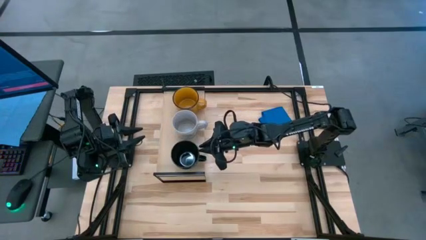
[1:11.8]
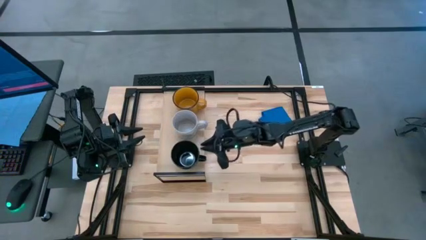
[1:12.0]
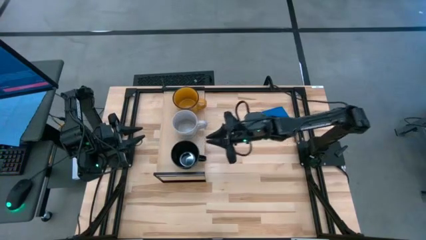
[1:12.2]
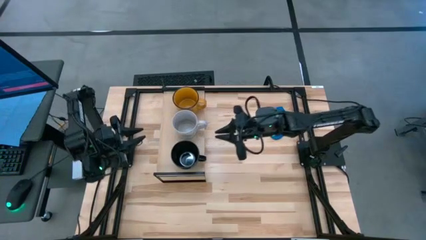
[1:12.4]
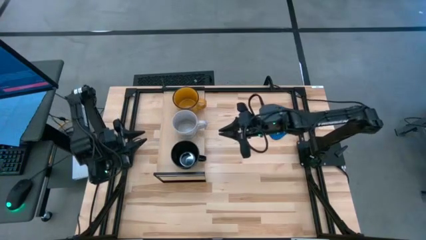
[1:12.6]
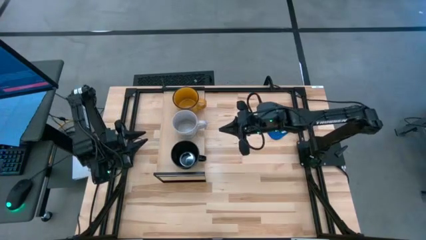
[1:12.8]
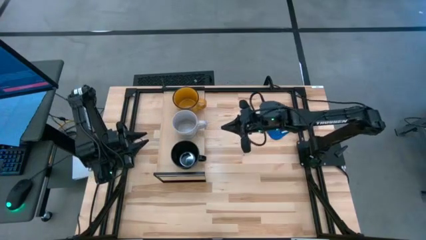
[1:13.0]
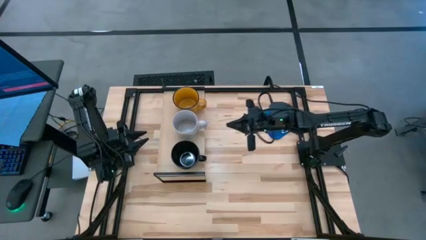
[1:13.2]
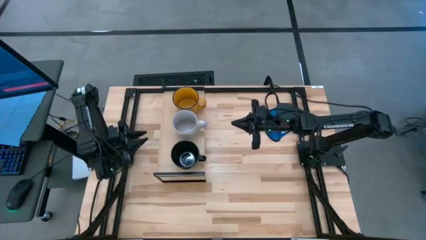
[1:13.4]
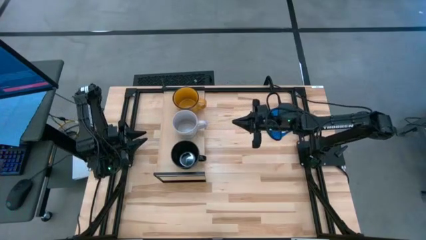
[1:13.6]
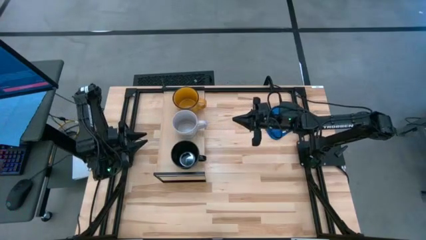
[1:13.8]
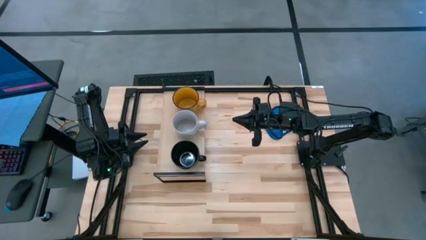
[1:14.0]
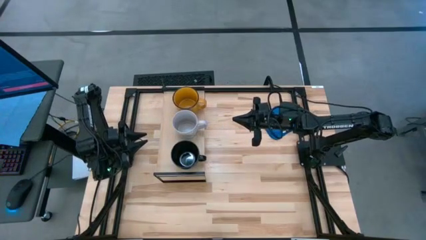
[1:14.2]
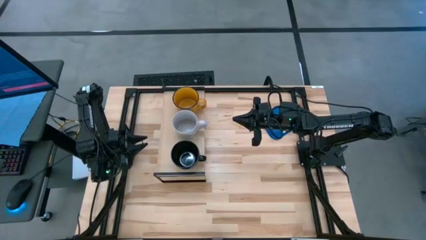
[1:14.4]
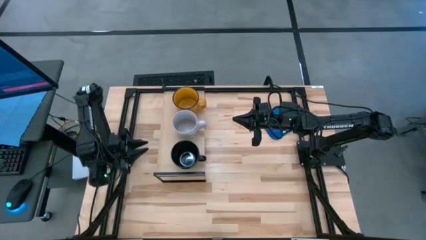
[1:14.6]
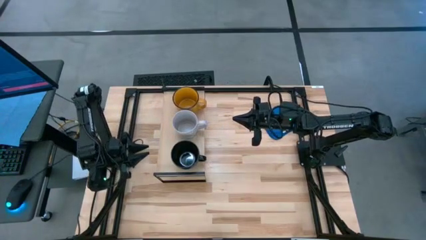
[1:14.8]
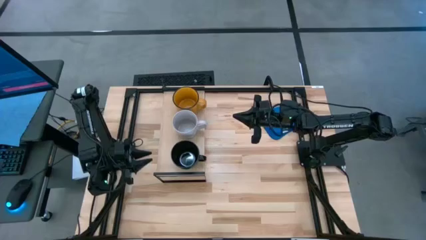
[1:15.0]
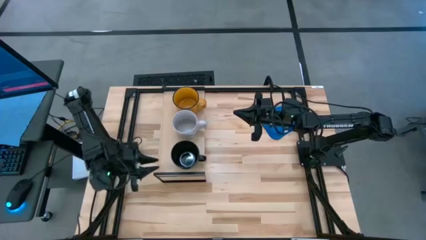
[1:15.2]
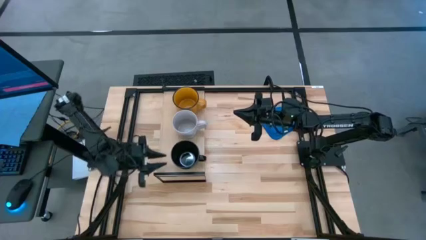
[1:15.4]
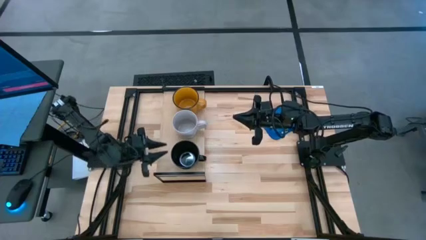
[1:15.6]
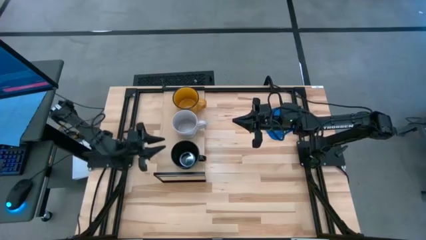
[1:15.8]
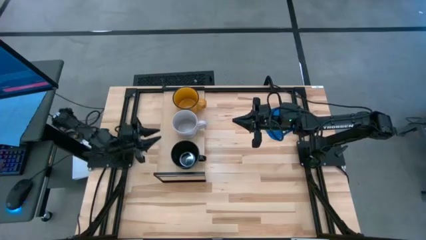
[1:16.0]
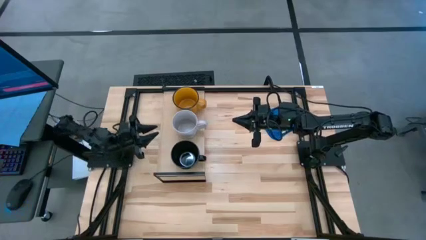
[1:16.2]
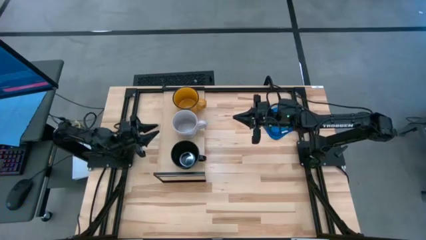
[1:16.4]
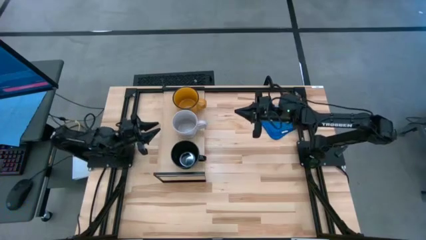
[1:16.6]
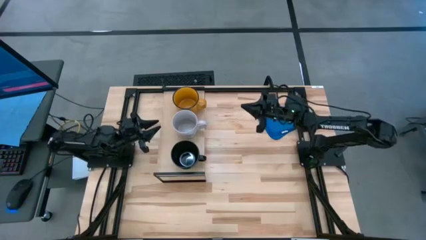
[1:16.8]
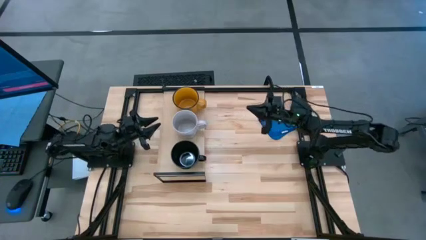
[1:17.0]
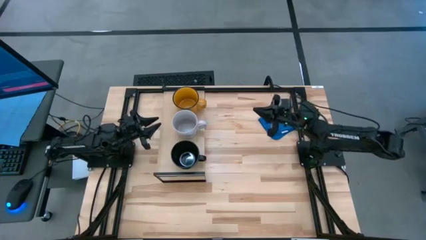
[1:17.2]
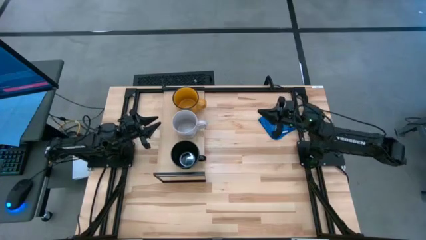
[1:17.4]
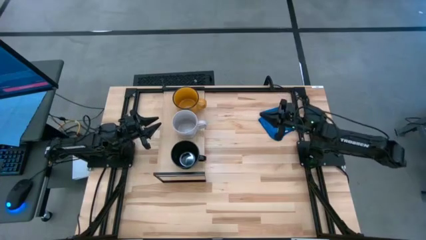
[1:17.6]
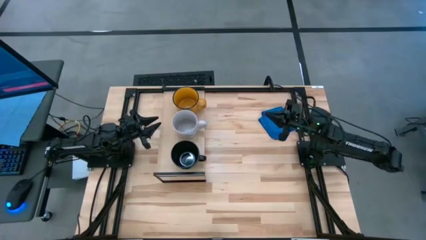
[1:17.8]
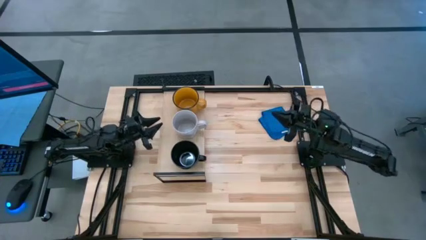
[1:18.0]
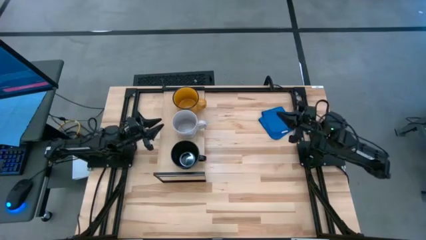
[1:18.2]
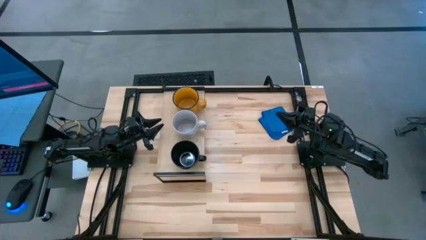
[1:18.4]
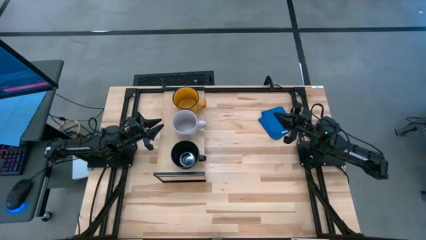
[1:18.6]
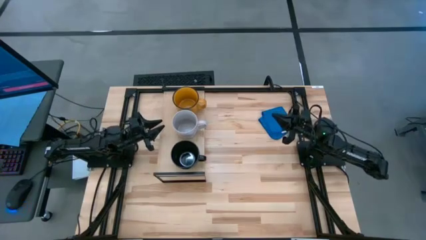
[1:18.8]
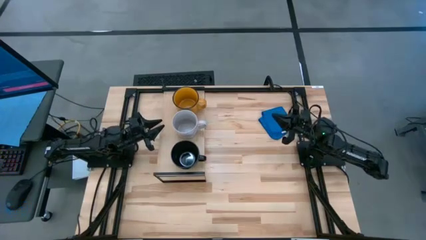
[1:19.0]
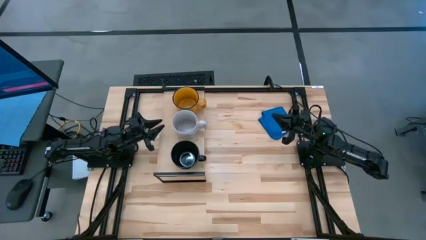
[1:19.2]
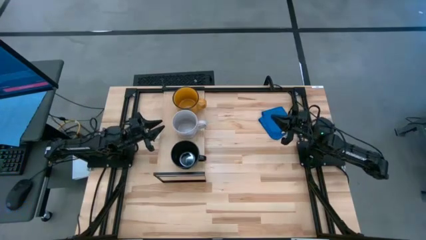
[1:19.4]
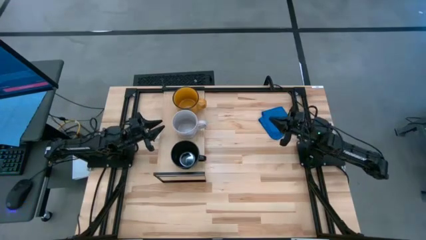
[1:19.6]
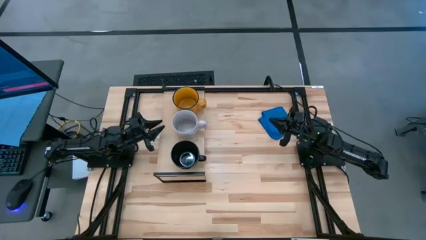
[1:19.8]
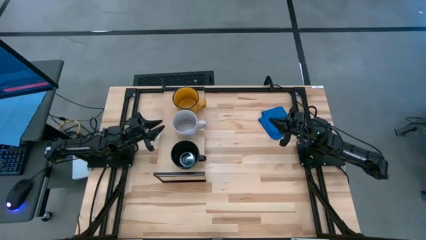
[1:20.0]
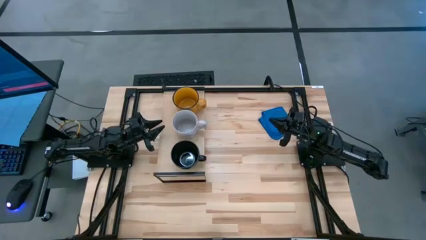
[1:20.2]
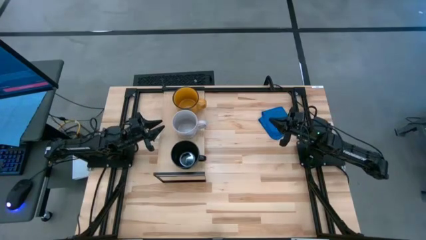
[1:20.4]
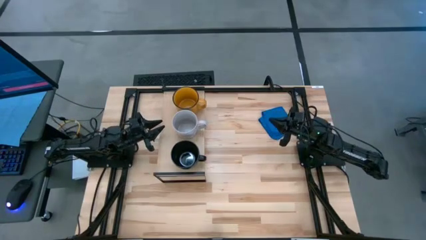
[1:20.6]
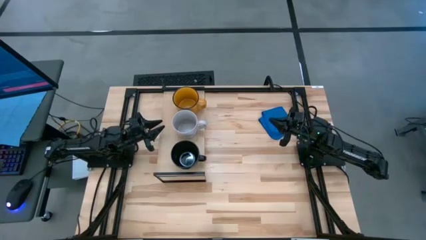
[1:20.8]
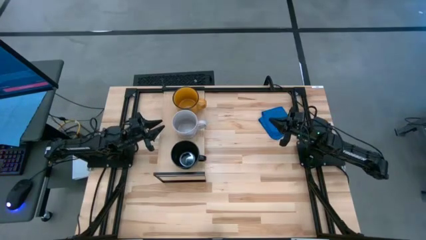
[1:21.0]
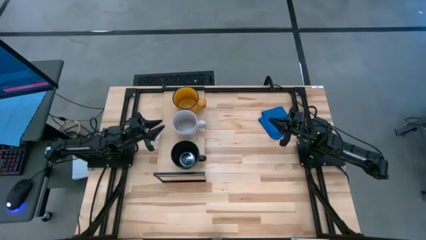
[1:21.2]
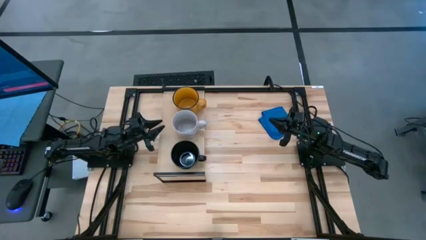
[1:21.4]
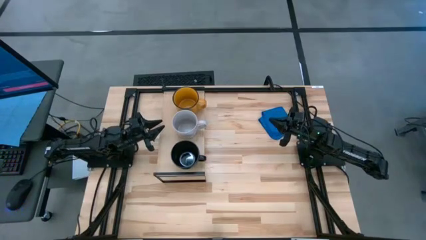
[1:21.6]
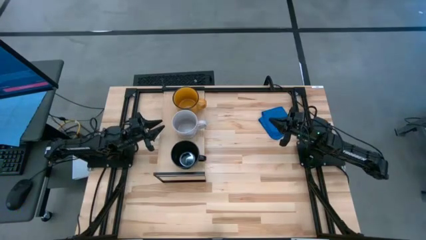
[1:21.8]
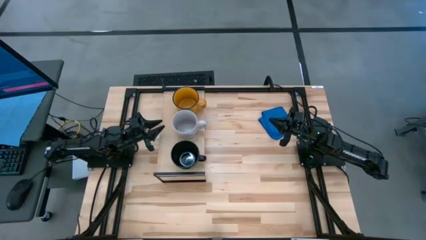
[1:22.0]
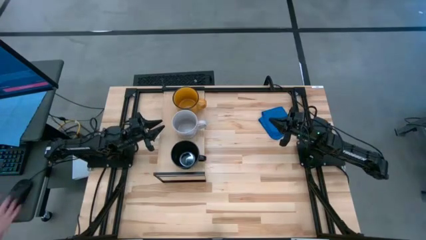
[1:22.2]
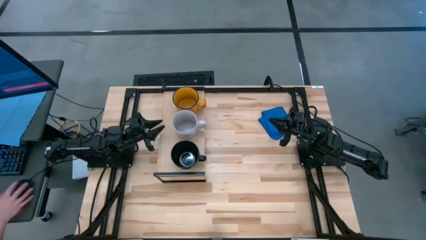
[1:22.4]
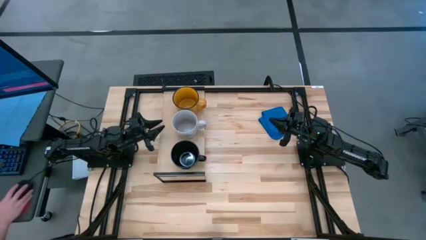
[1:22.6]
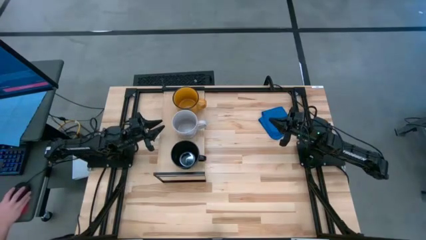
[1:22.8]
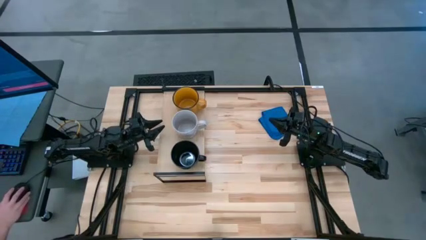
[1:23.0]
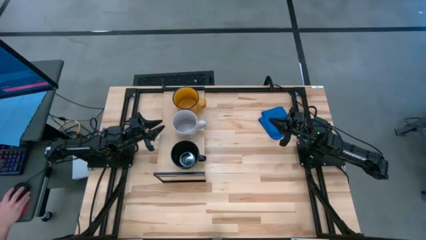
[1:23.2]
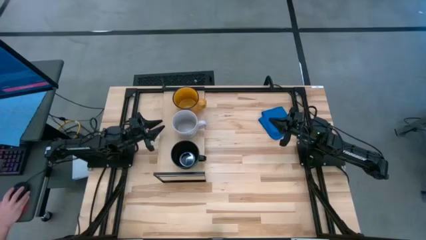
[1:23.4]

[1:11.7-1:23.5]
Task: Stack small to large cups/mugs on shelf
Return to Home Position

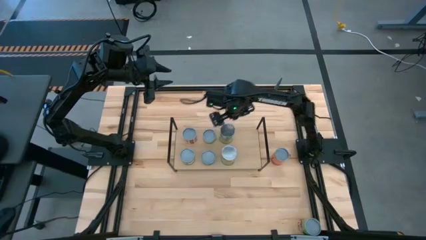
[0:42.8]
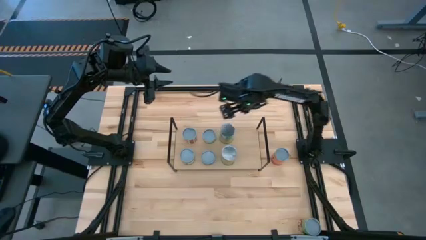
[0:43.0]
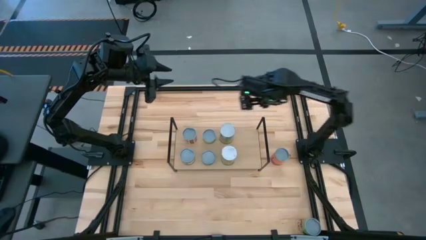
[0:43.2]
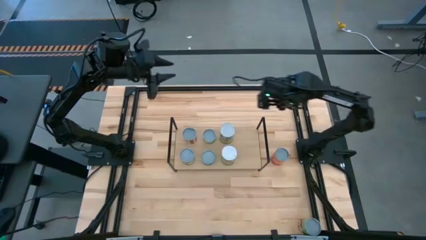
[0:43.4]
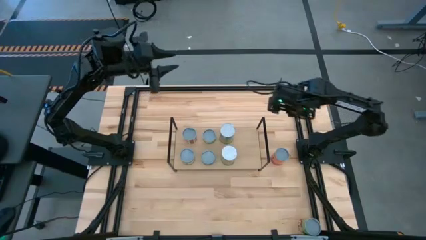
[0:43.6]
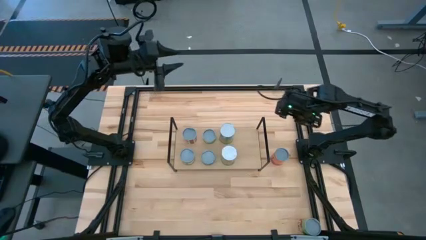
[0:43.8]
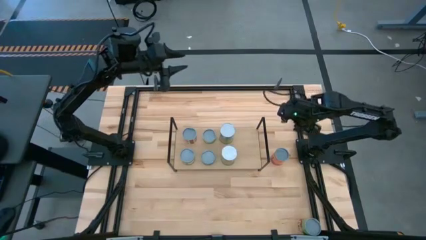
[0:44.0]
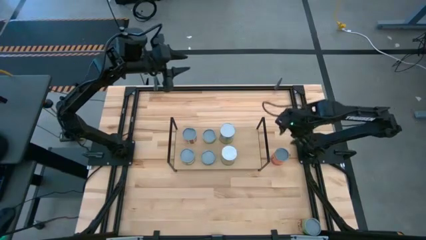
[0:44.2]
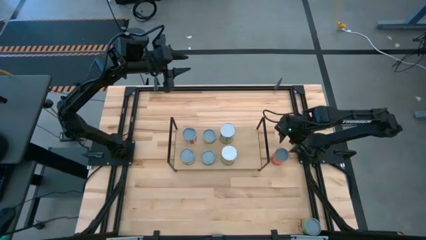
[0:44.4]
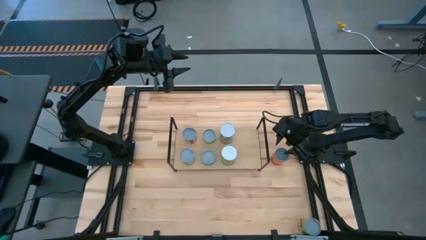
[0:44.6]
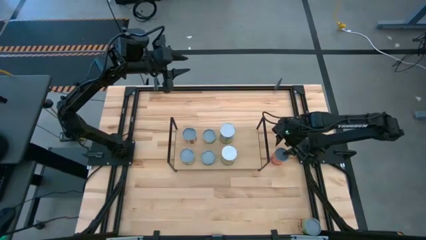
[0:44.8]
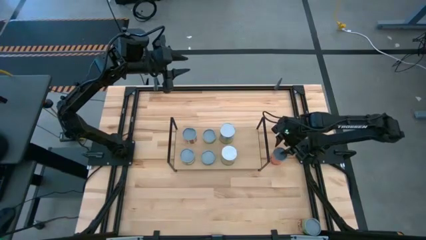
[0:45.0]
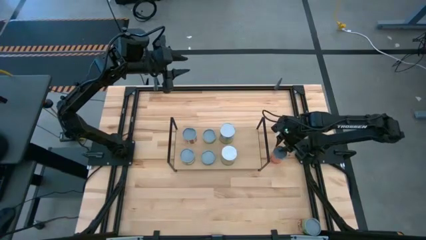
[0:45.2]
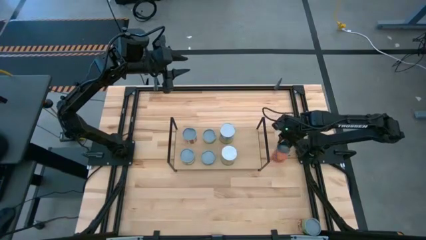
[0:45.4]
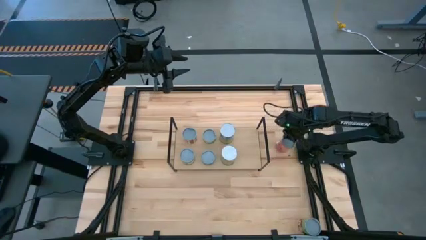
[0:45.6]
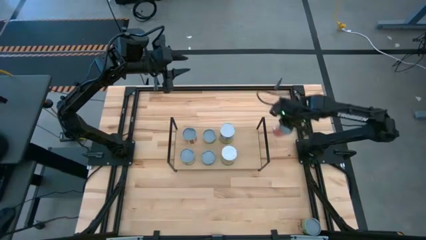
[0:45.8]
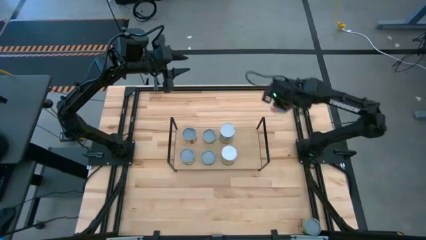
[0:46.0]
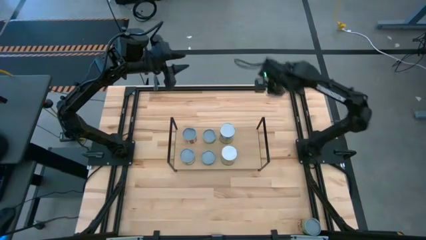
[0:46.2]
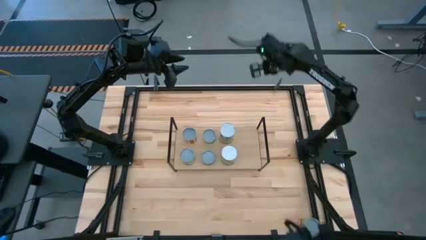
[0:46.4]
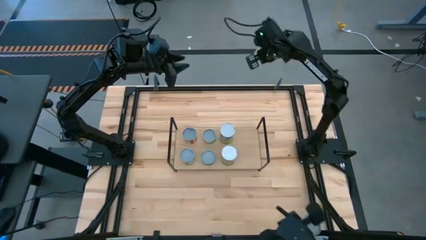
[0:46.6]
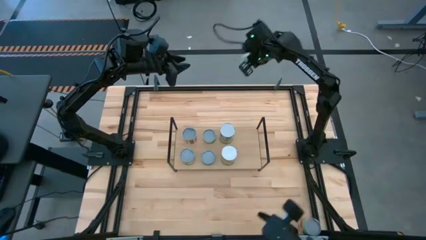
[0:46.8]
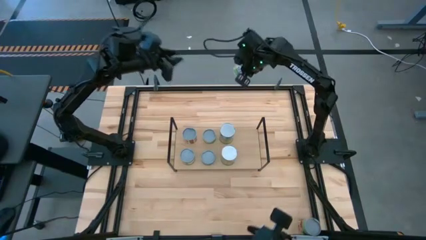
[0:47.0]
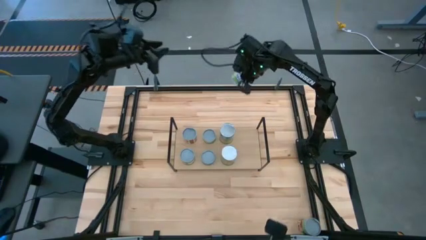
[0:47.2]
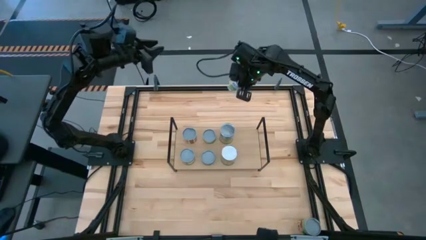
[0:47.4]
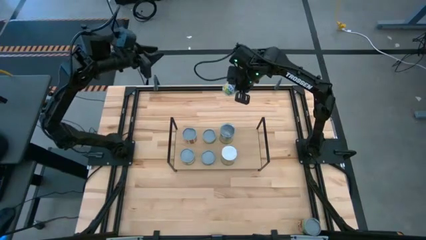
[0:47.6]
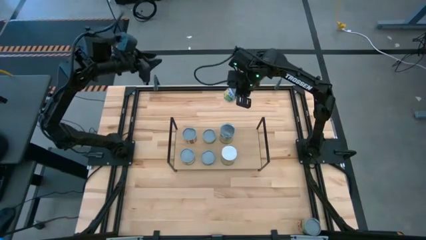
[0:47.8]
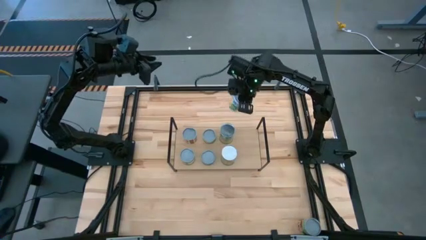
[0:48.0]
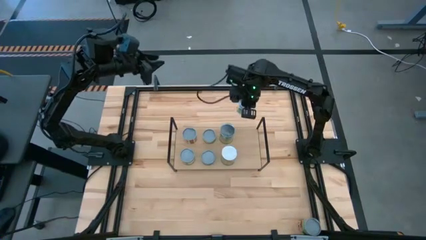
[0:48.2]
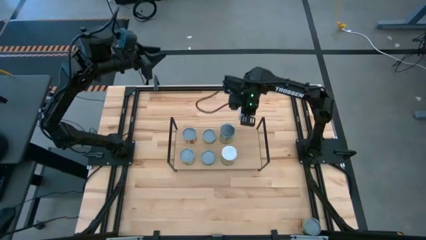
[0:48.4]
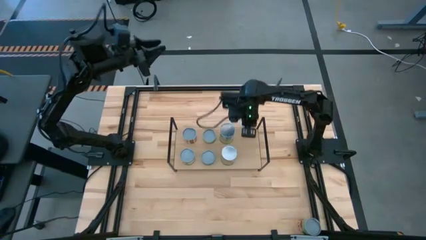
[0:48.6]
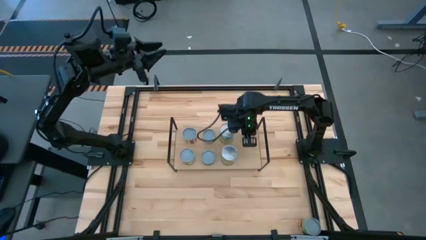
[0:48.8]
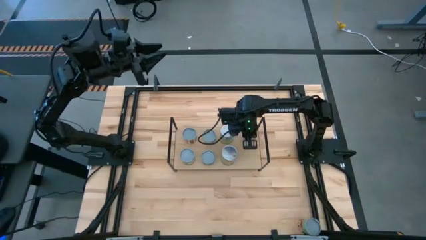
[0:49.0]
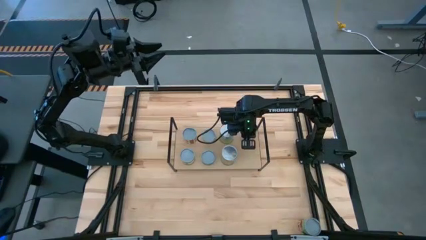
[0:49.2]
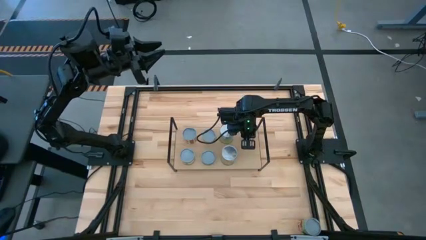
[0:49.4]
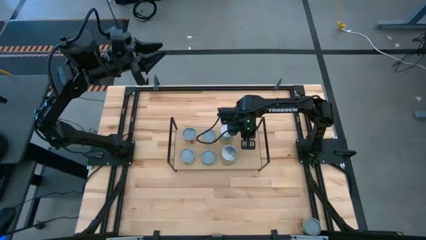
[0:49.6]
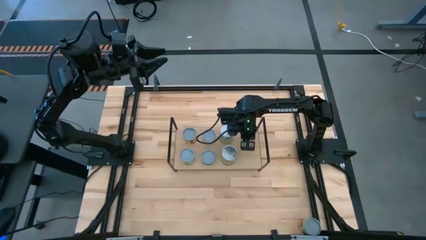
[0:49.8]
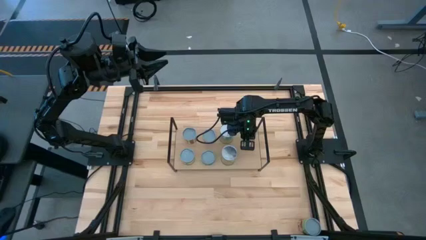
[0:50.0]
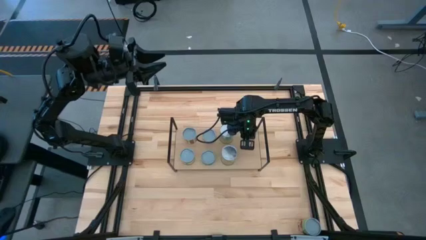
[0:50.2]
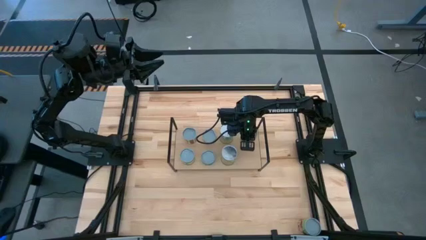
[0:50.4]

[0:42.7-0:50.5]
Task: Pick and place cans onto a shelf
Put the canned mixed fruit on the shelf
